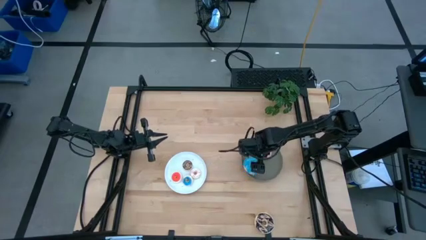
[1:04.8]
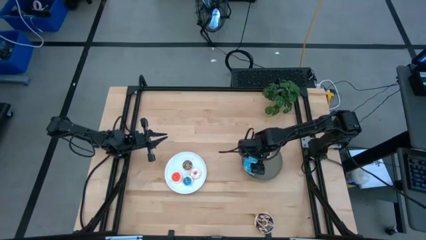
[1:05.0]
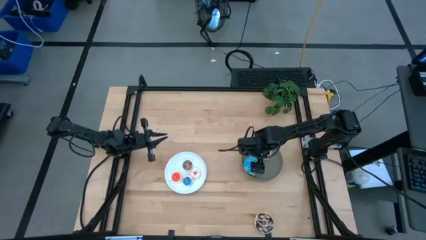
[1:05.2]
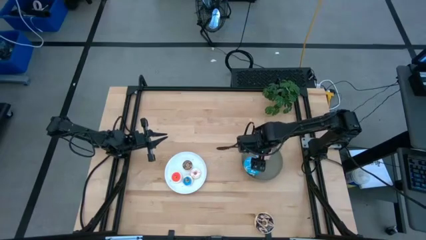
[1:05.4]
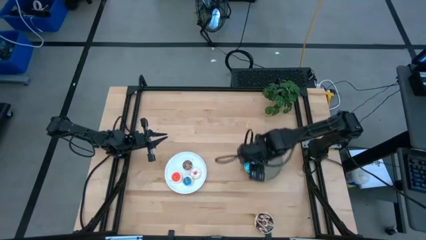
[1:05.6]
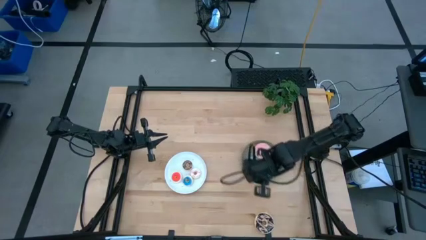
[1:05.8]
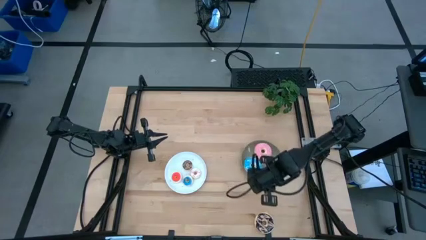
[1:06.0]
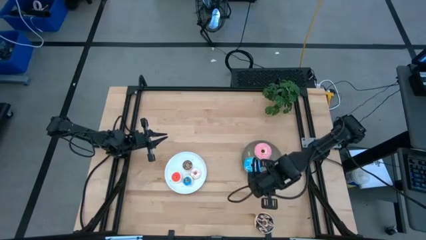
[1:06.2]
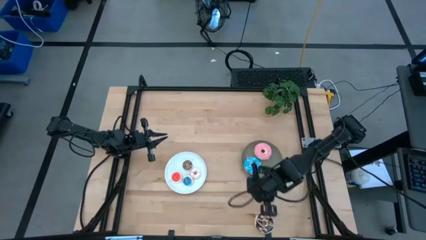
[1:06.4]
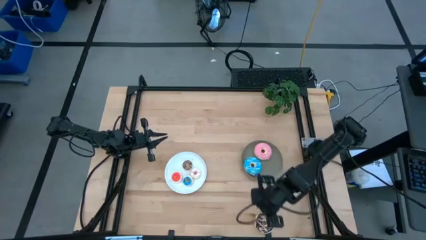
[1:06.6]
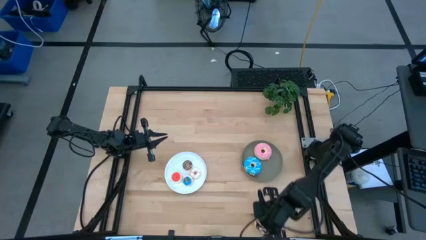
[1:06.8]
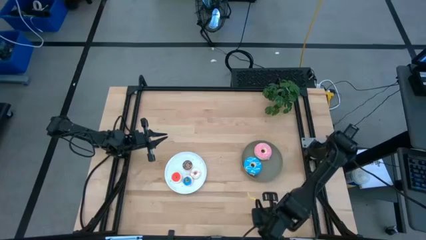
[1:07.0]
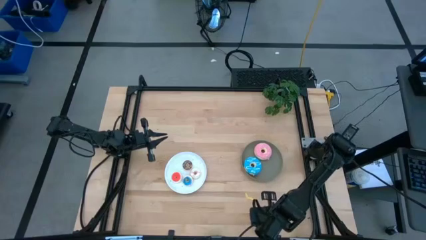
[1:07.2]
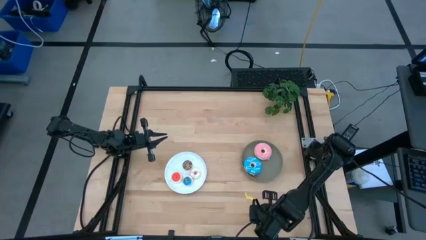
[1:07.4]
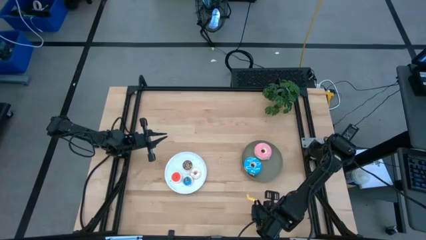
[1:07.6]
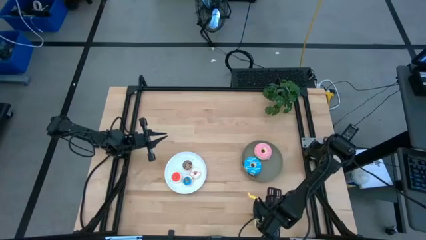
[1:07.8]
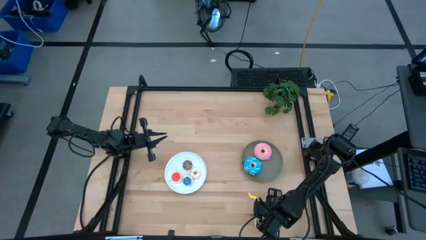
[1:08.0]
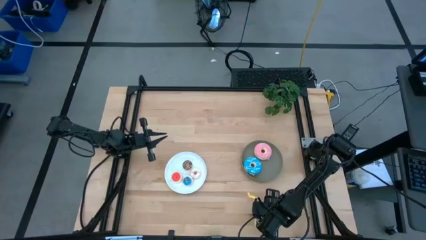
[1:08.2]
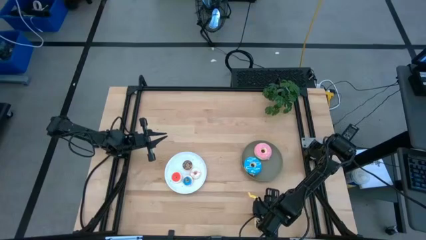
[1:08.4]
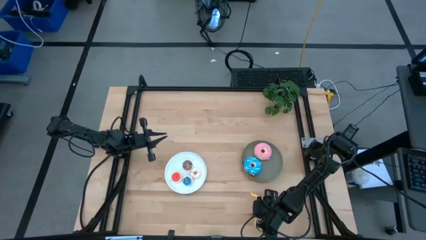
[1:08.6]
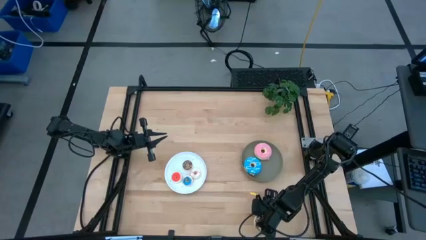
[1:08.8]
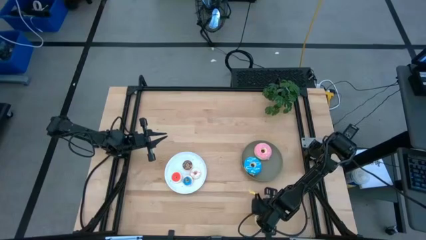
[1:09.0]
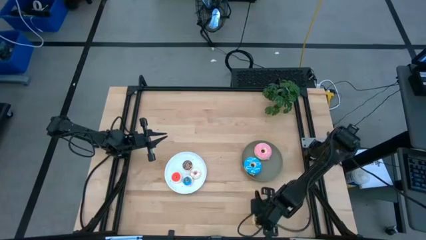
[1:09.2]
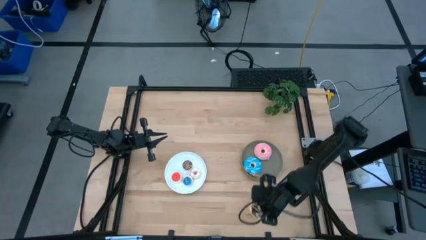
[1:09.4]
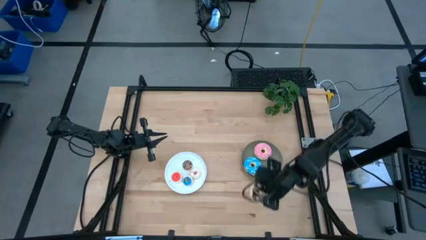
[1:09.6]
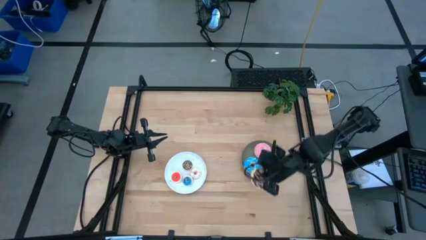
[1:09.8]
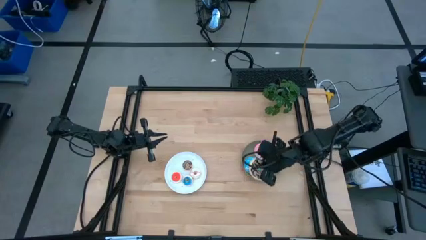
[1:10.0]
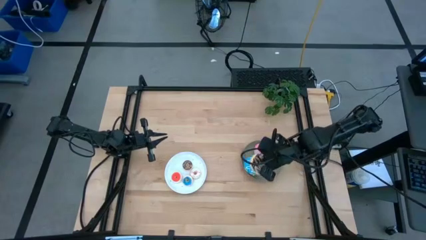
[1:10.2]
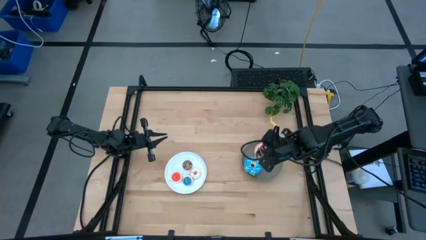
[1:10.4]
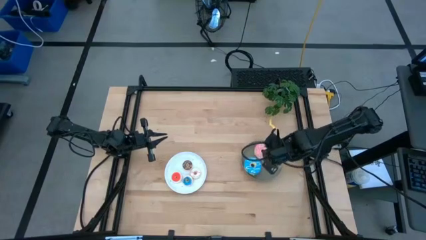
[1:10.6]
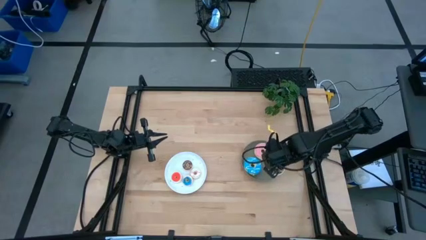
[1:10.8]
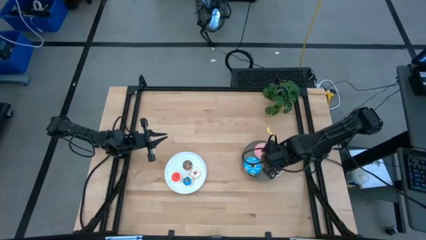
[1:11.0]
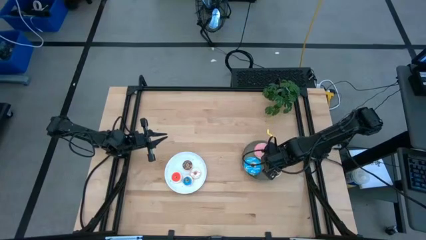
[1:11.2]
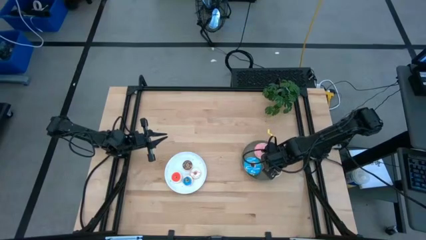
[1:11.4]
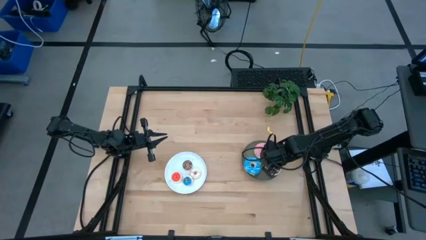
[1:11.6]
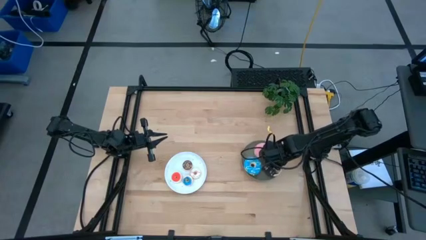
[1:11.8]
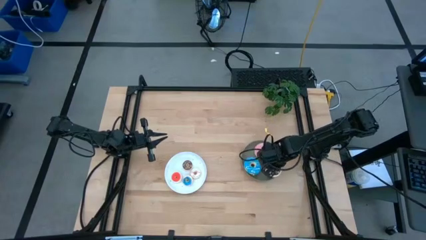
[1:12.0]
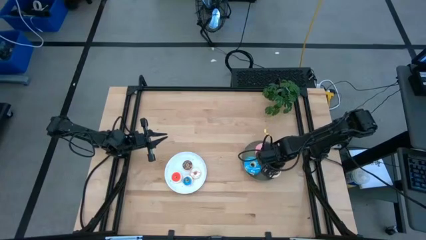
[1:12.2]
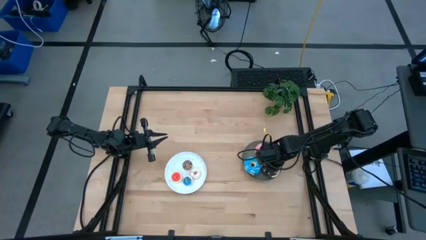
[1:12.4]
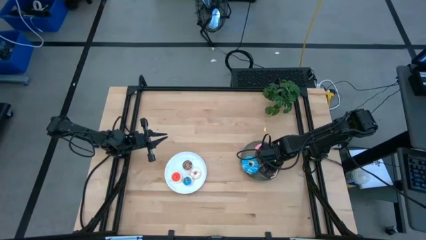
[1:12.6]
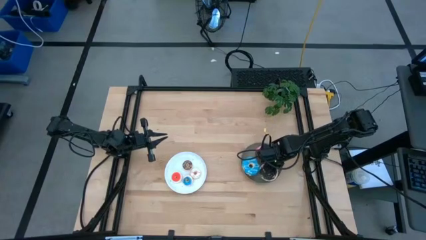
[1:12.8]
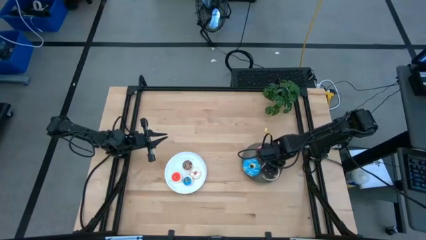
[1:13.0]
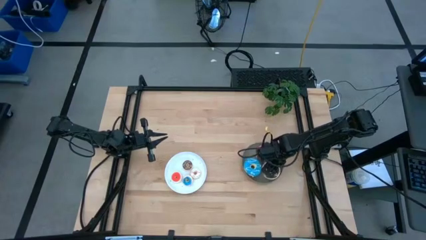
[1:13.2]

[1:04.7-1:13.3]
Task: Pick & Place donuts
Put the big black donut on the gray plate

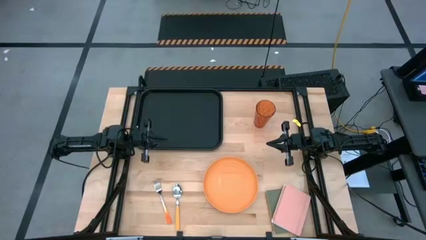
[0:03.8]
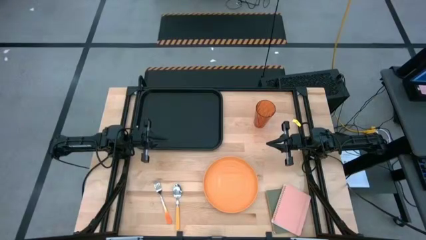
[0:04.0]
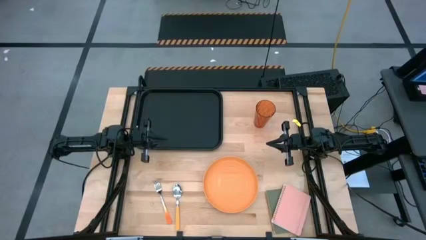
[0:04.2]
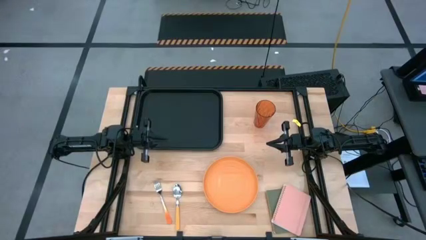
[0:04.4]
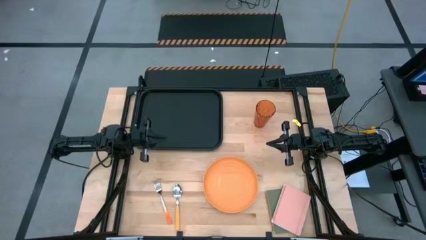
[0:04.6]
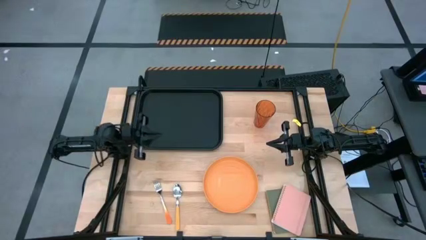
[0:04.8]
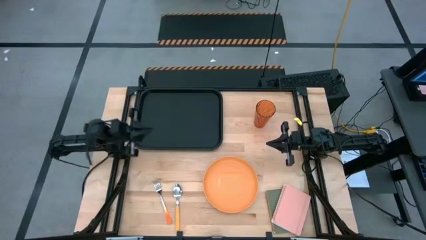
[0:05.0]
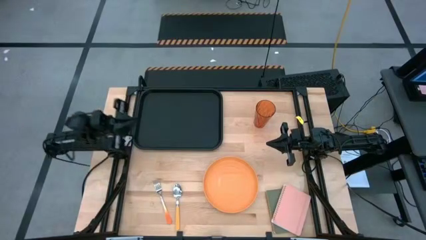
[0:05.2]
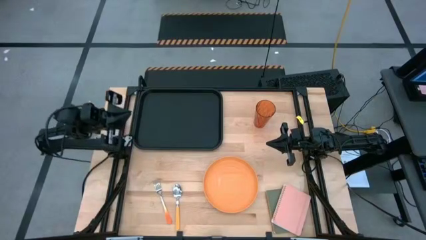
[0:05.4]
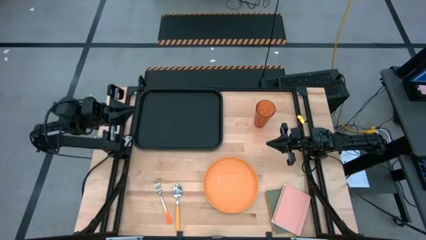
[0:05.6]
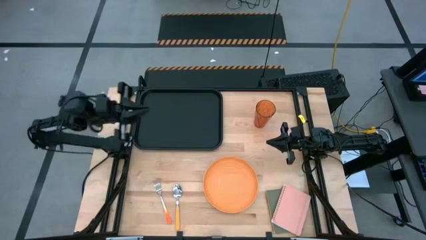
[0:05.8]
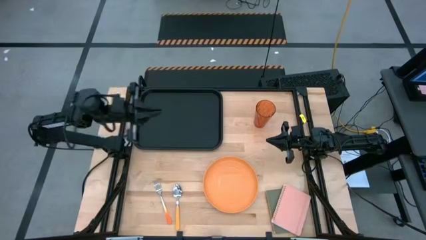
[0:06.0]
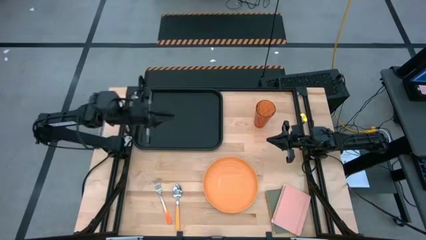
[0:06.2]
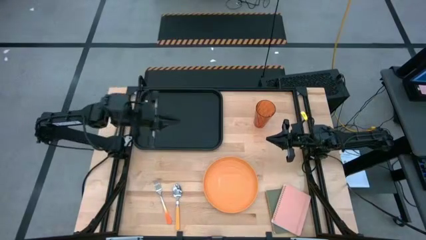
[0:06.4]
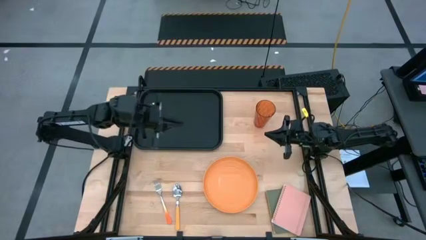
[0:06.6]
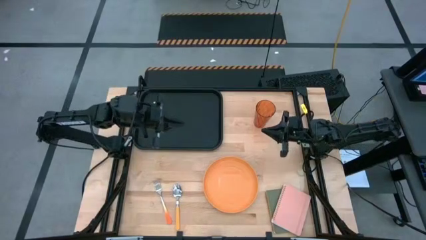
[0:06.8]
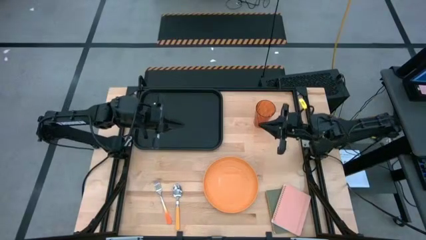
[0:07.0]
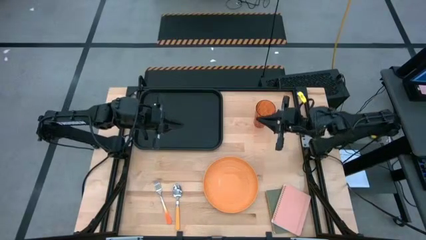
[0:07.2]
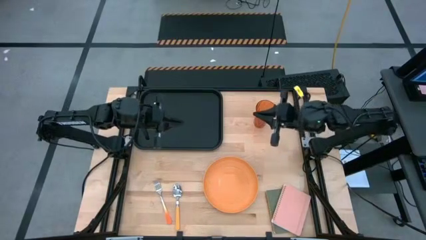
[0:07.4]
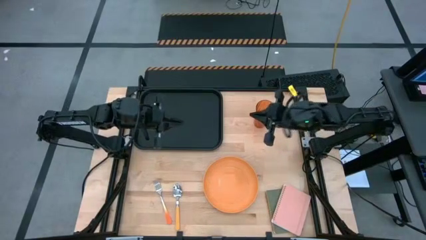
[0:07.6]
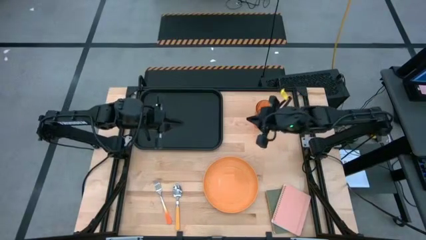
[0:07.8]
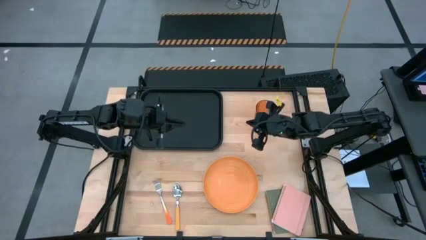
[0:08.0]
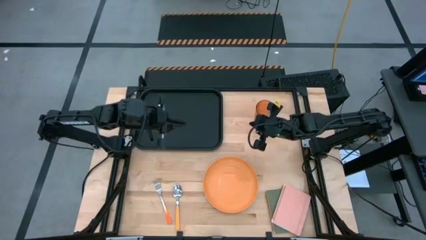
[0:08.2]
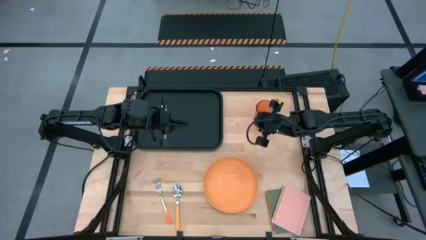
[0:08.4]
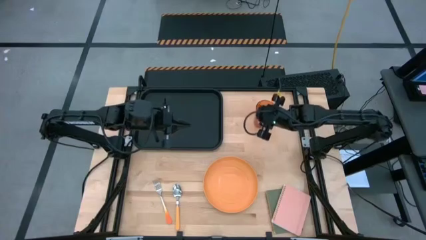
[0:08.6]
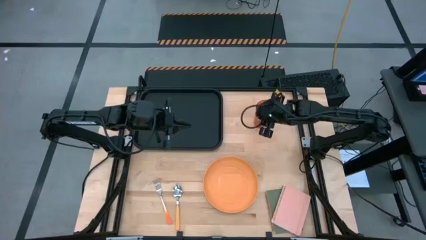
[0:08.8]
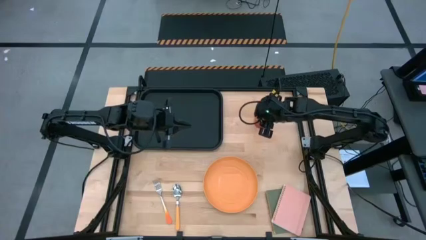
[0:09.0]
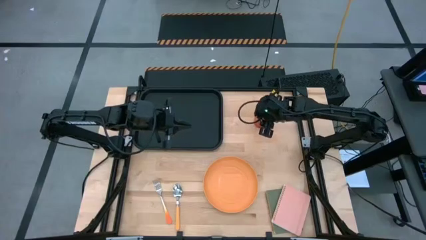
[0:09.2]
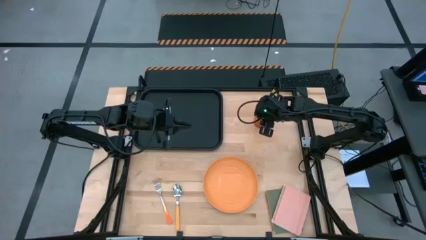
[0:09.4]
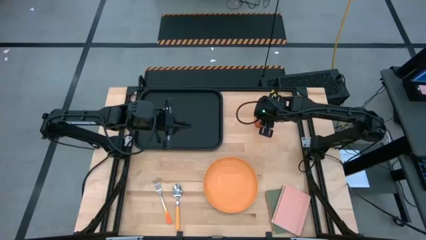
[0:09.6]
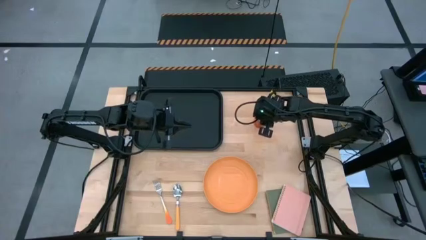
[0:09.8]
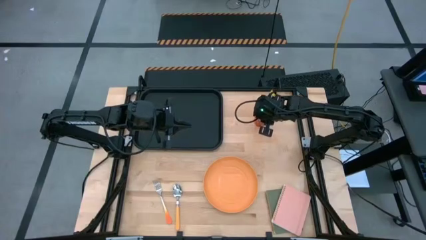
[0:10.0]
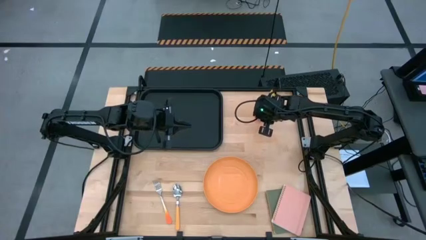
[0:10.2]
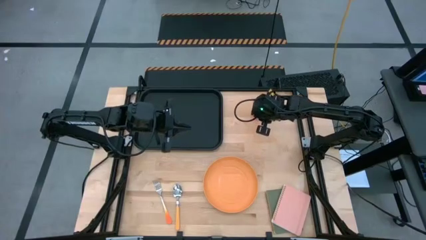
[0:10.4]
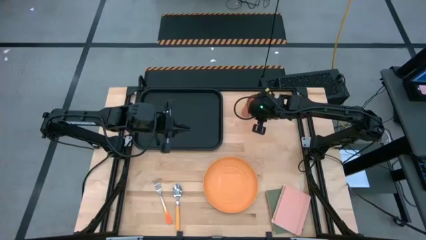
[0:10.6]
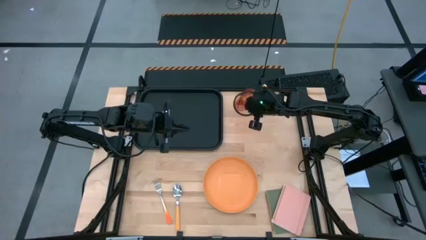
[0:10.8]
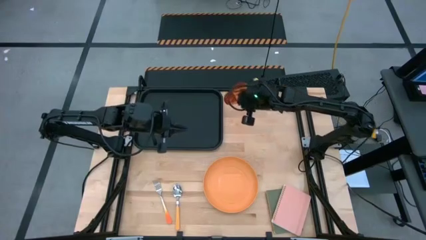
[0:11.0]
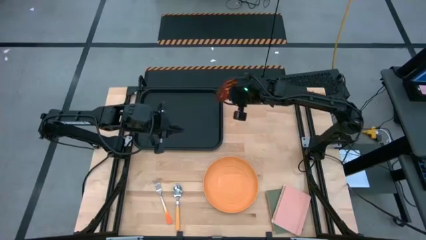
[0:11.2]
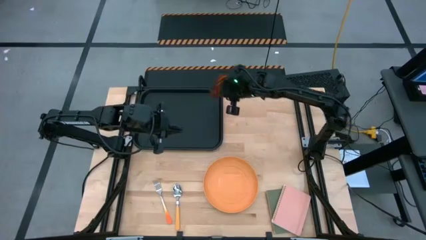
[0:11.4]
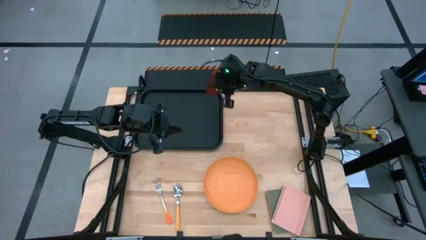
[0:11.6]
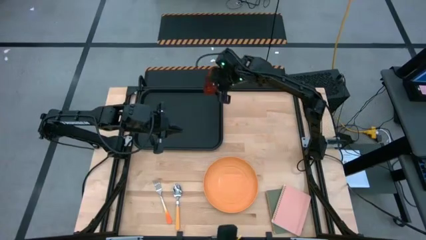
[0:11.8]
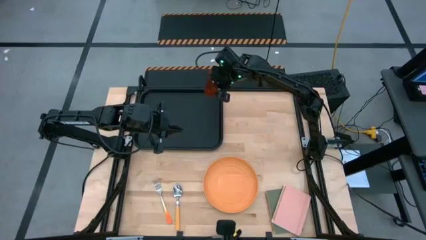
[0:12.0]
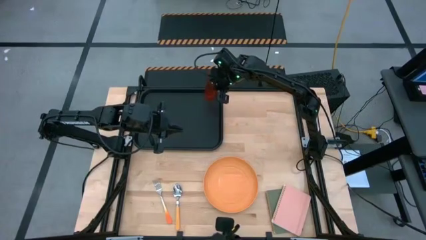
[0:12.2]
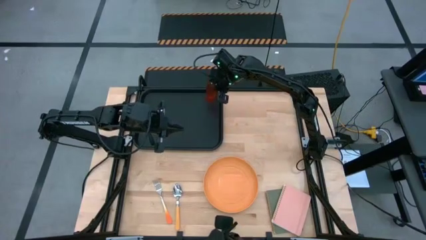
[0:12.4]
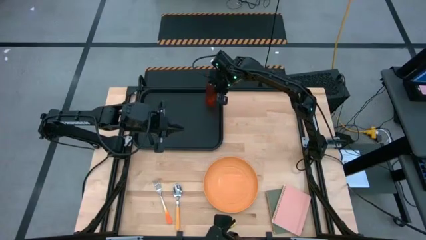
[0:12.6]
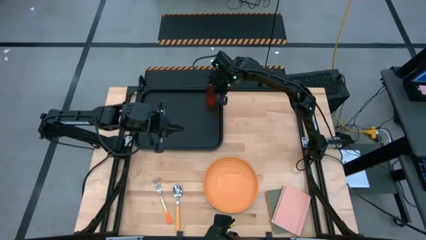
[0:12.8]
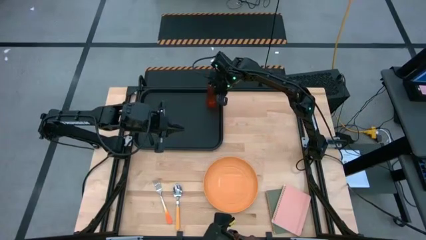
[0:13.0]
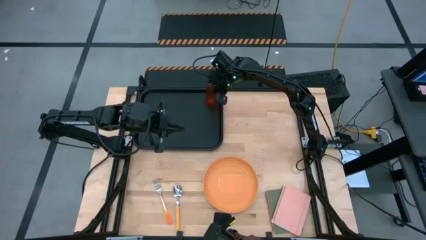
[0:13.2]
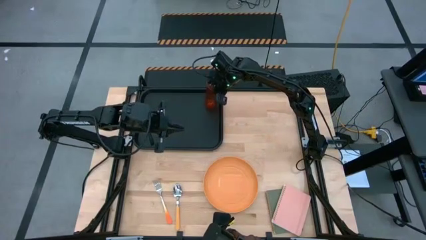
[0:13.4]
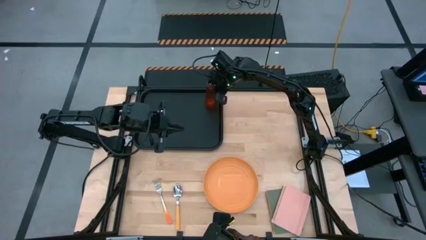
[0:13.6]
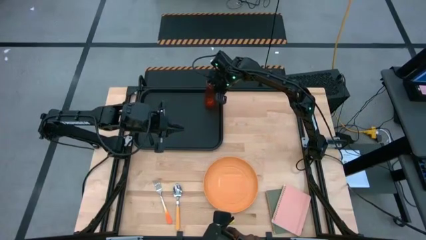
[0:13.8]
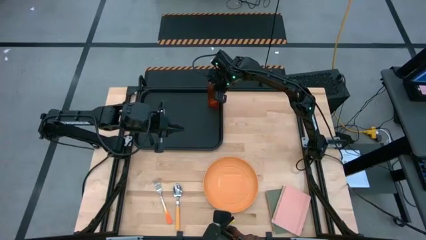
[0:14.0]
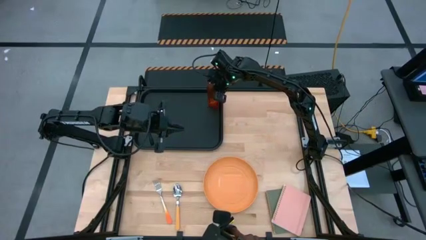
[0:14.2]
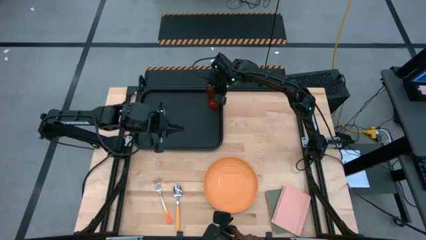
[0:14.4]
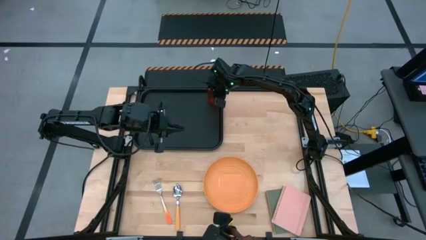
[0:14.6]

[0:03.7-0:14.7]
Task: Pick and place plate/cup/fork/spoon on tray
Put the orange cup on the black serving tray
